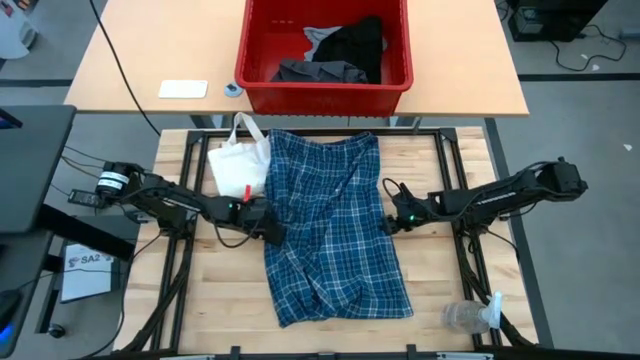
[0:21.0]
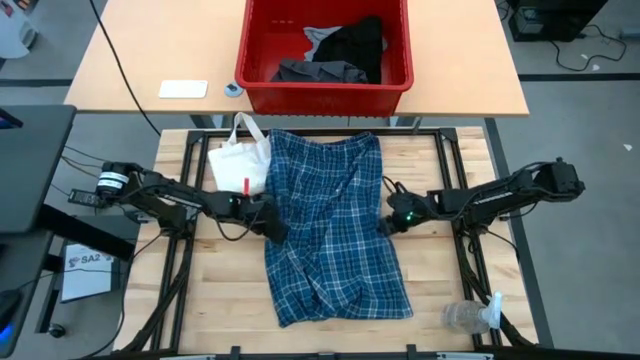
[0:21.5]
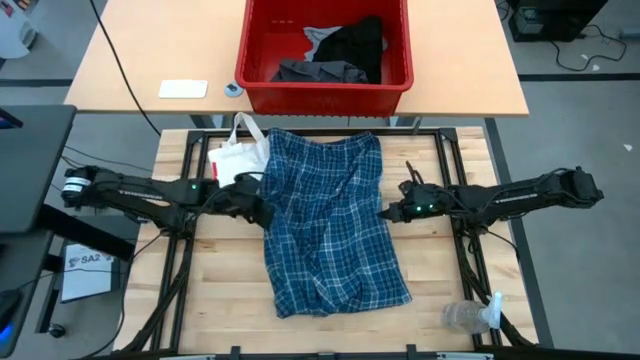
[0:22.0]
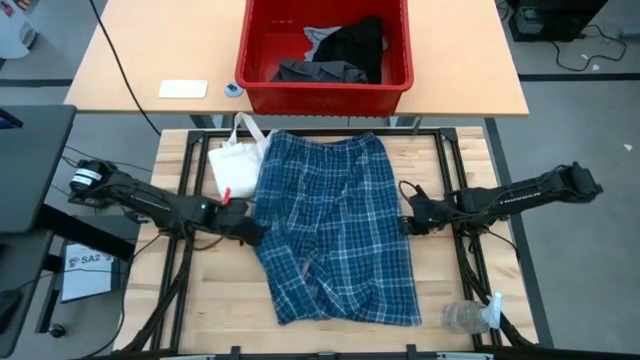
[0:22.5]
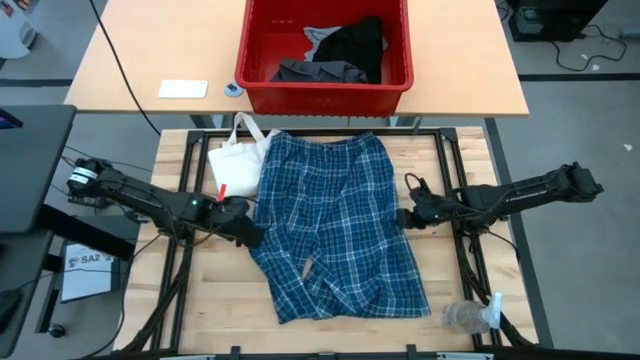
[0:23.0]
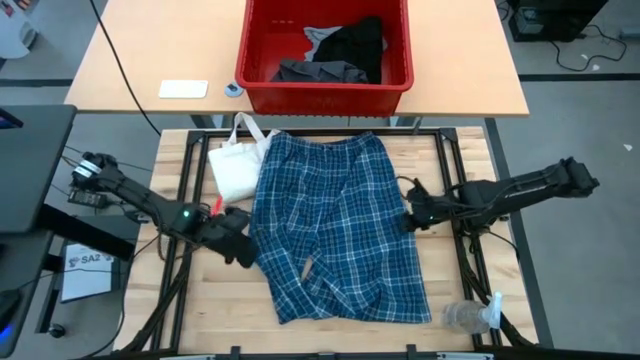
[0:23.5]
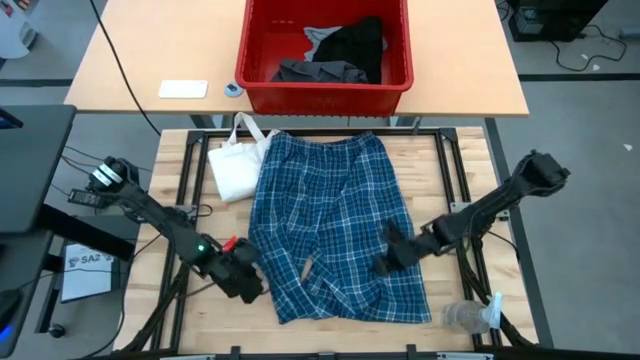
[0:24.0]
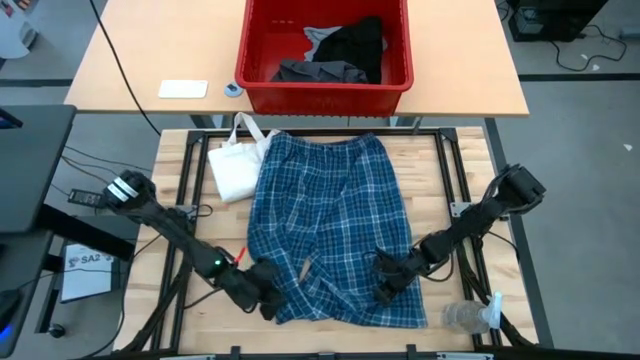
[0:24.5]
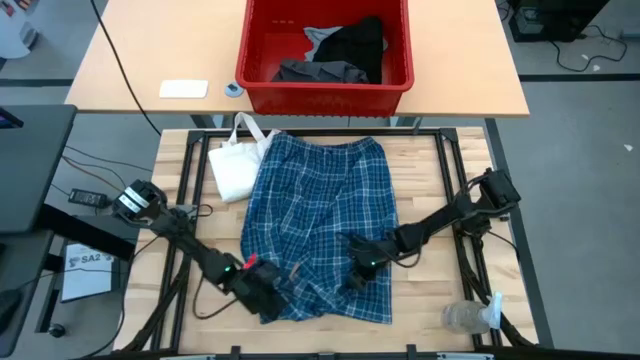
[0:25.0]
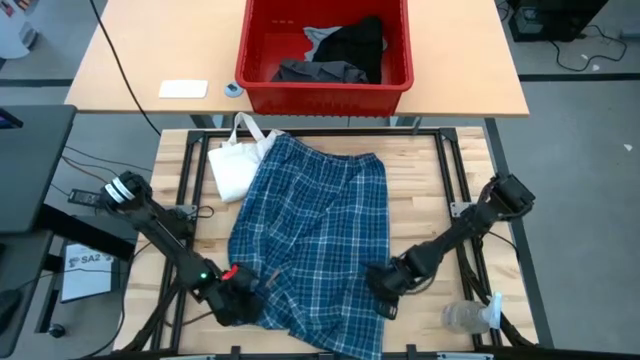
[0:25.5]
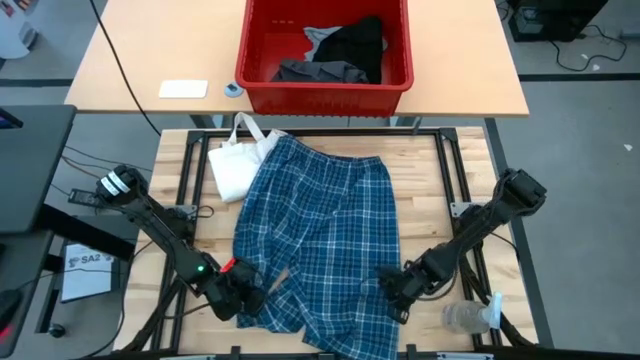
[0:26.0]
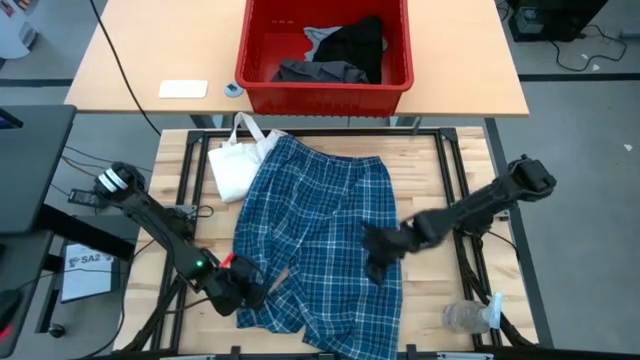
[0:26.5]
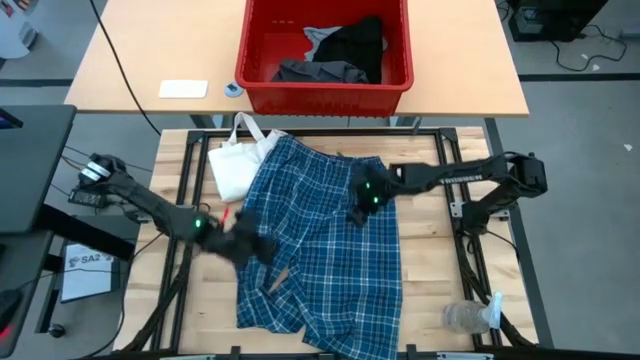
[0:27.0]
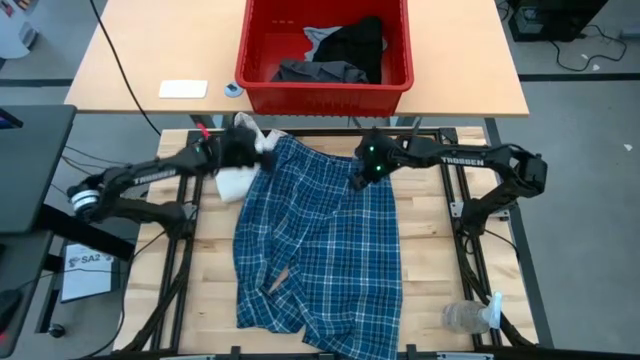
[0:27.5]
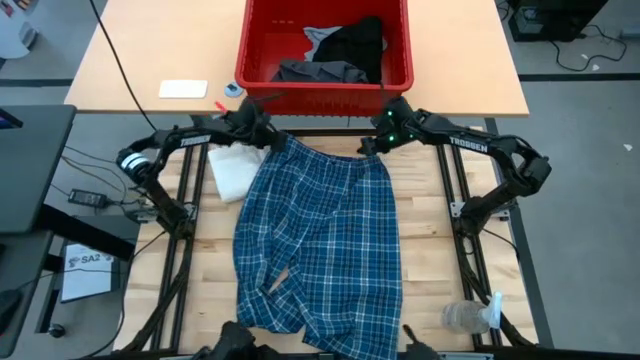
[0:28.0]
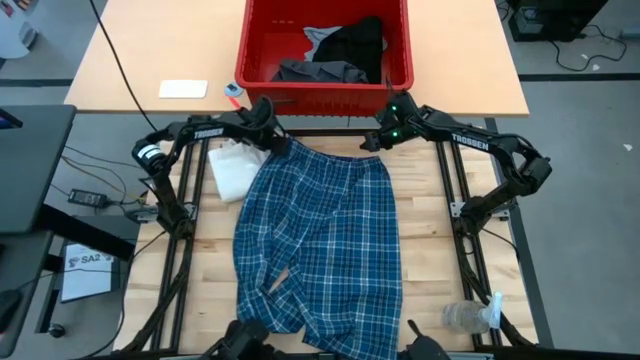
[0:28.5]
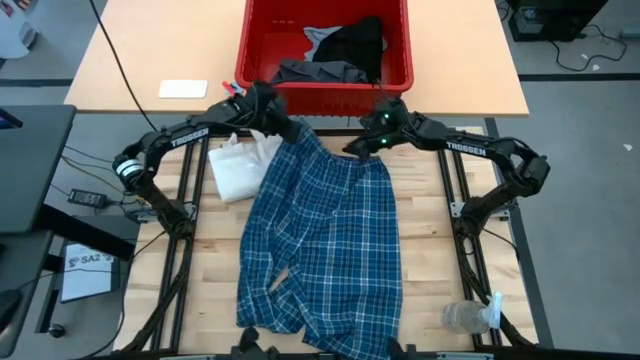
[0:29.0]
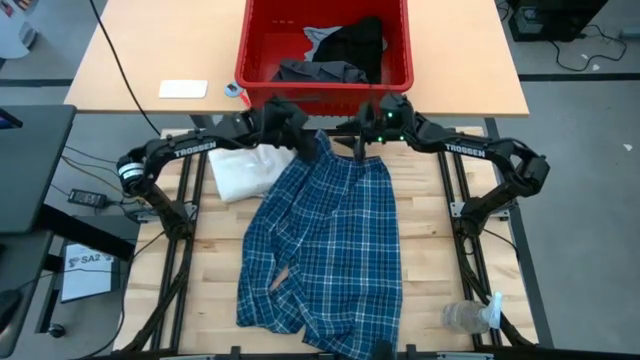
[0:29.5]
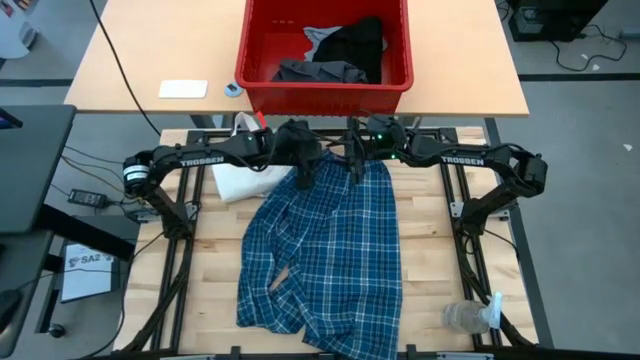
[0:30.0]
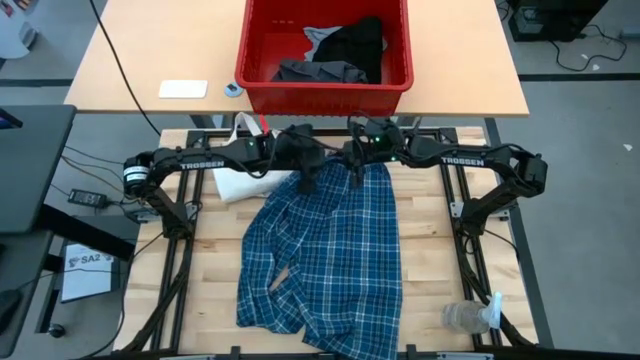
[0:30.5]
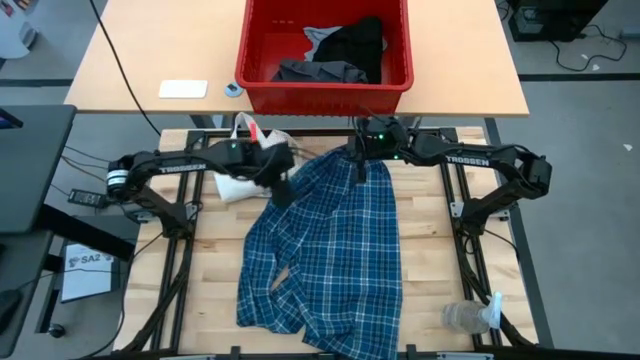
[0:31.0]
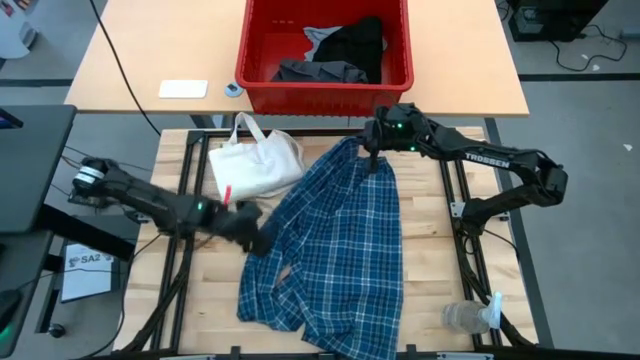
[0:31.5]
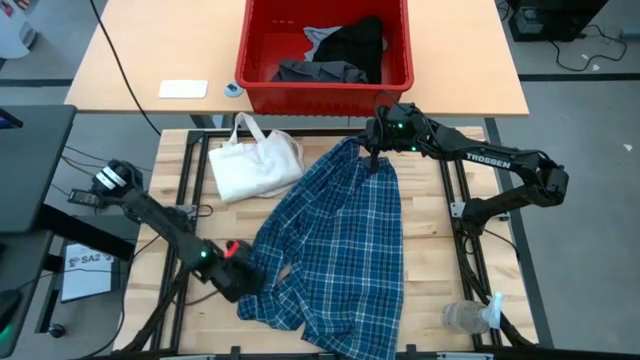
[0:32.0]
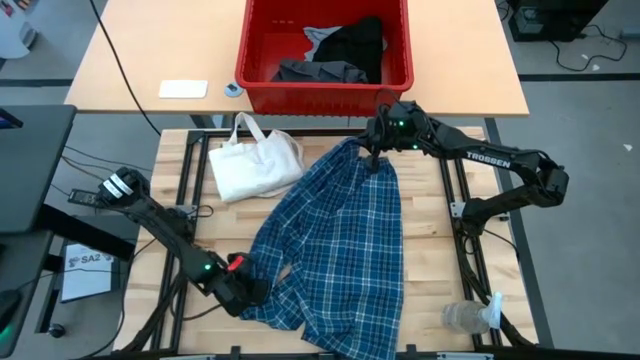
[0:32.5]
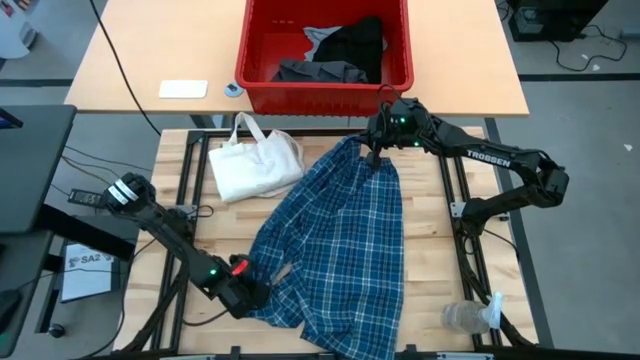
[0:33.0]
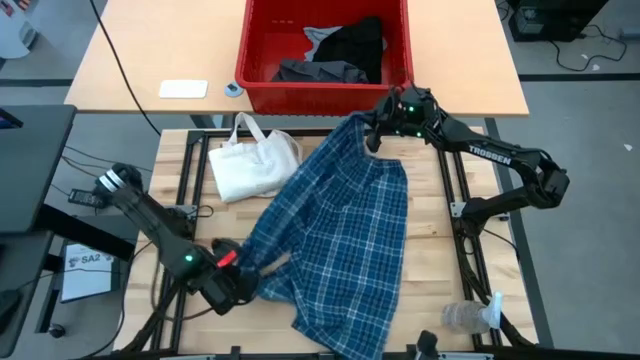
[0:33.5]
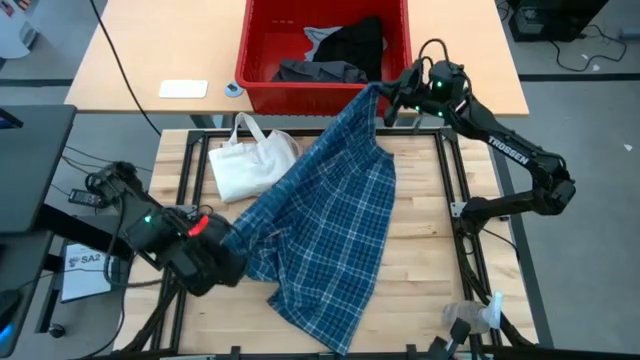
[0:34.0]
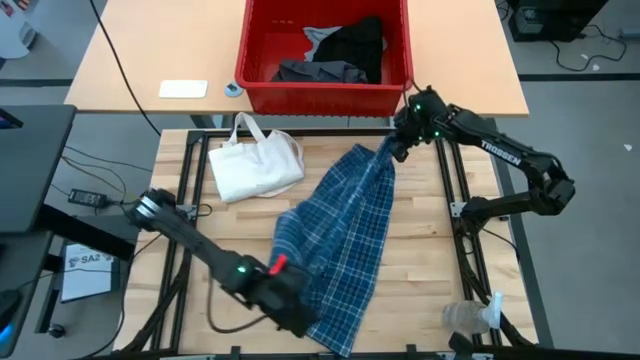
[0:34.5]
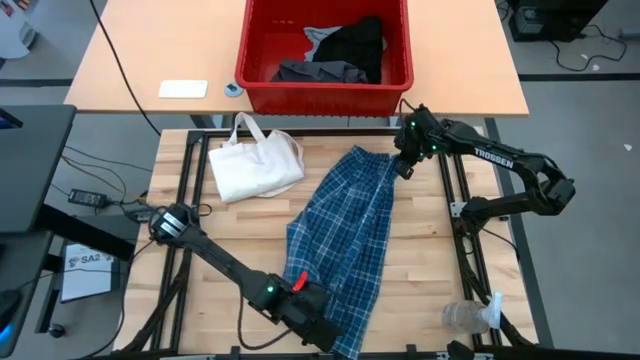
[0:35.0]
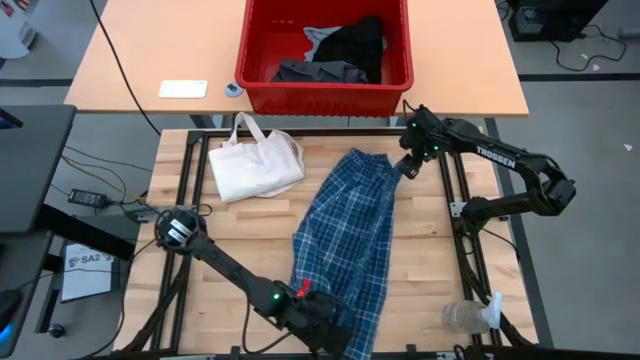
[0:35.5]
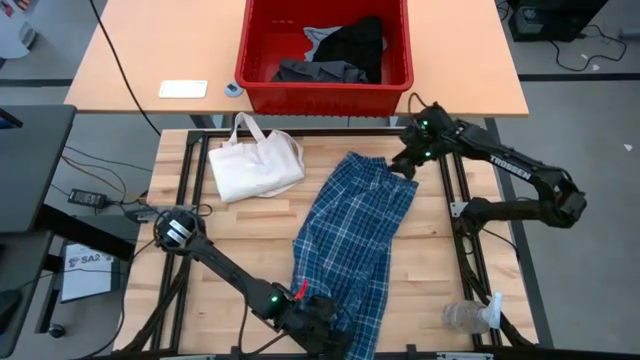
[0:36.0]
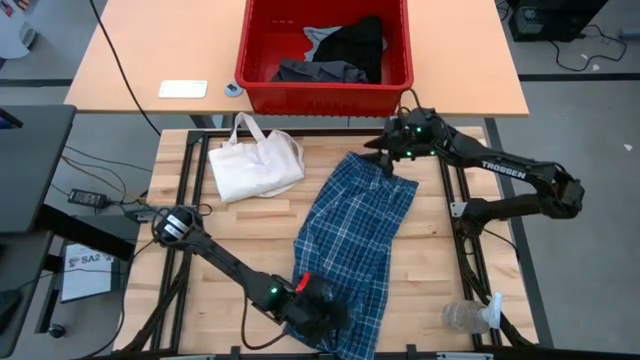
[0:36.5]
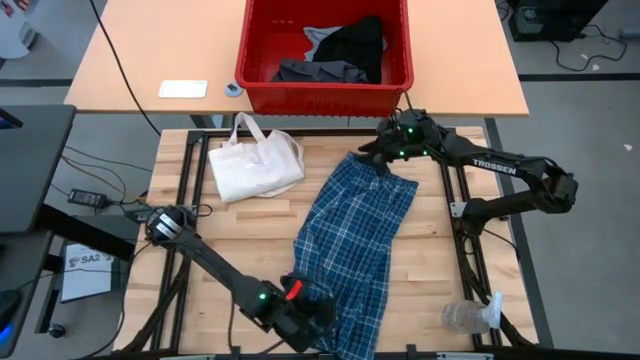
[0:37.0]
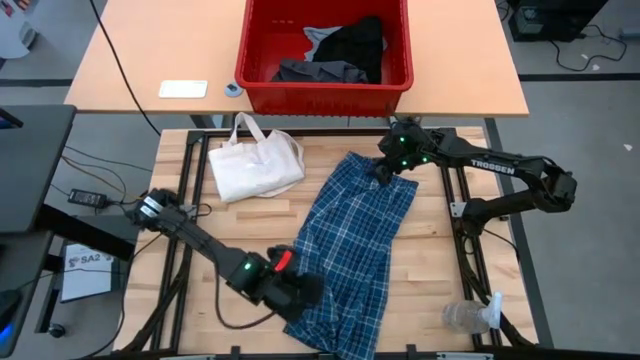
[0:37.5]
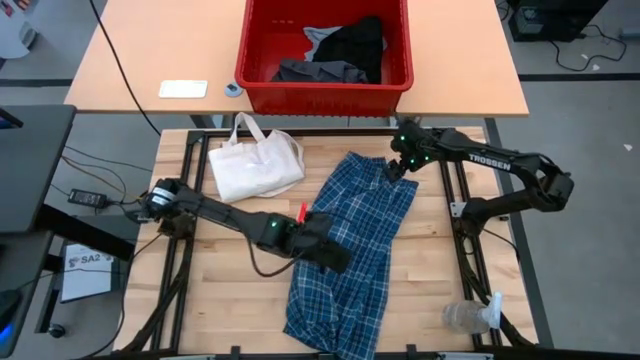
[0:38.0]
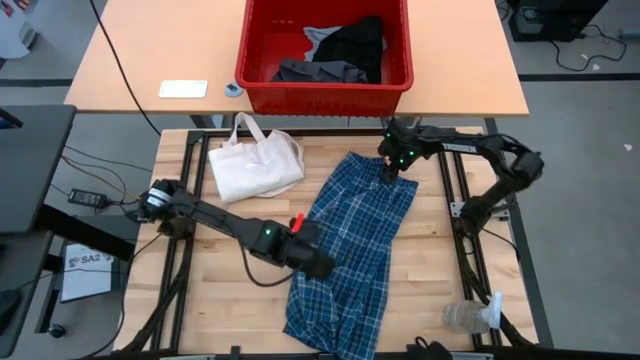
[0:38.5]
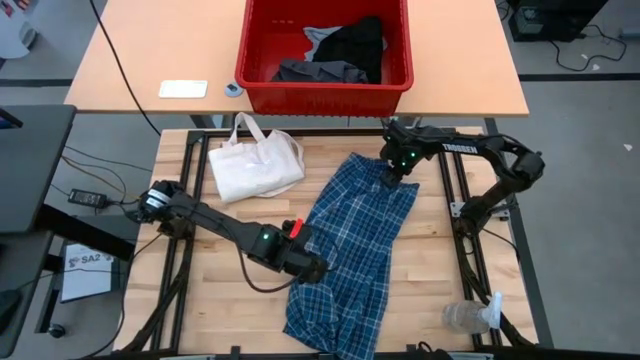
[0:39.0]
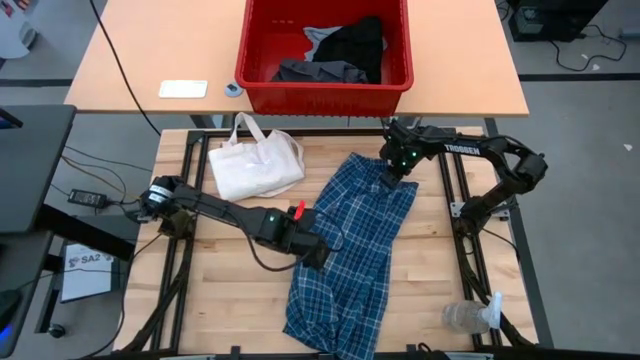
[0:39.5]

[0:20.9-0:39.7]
Task: Fold laundry
Fold the blue pants

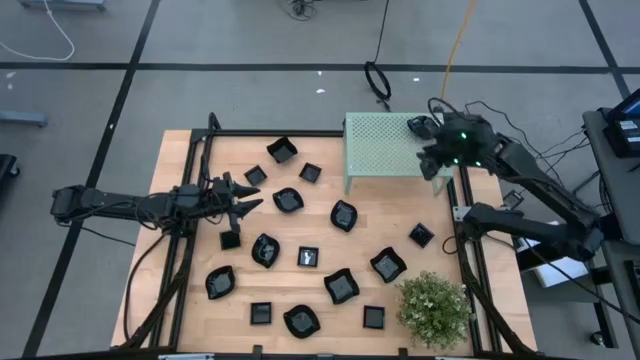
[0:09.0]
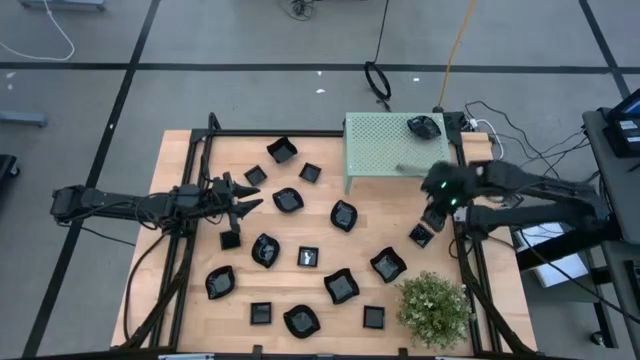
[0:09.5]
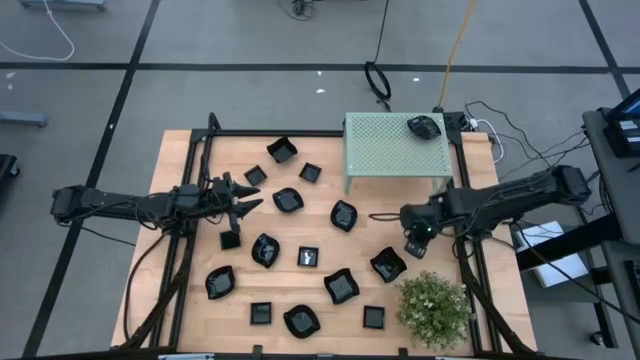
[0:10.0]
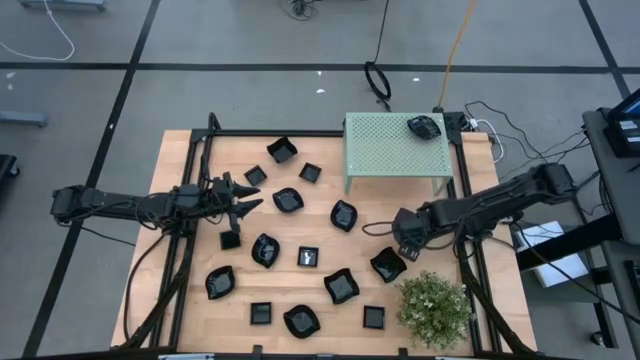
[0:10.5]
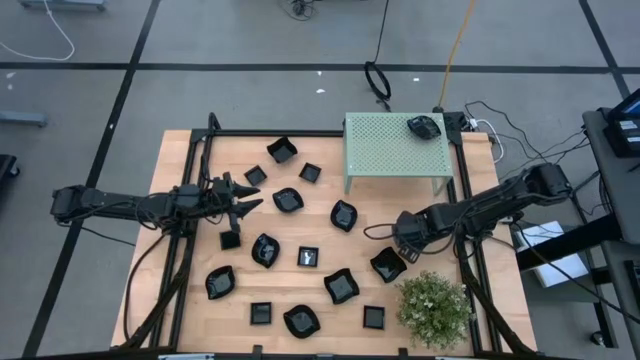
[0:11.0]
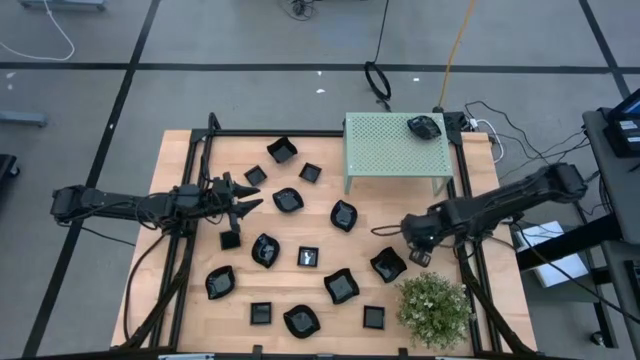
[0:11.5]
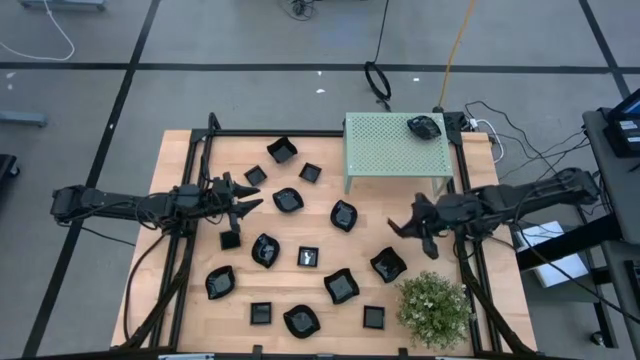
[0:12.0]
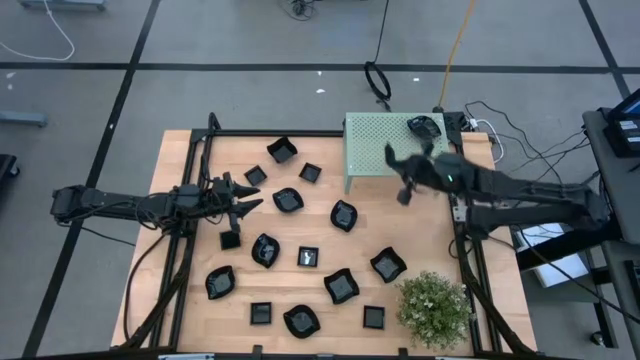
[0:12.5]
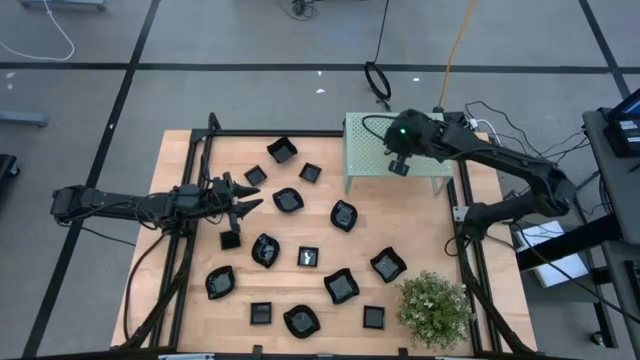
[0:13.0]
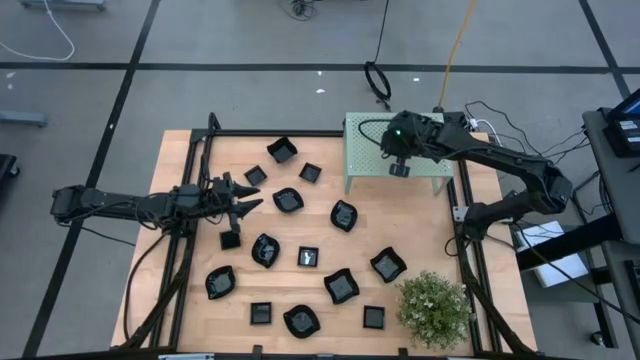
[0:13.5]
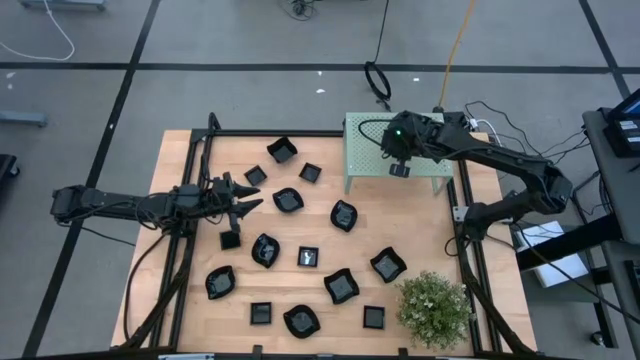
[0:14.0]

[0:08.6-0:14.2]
Task: Pick & Place Mini shaped plates
Put the black square plate on the shelf
